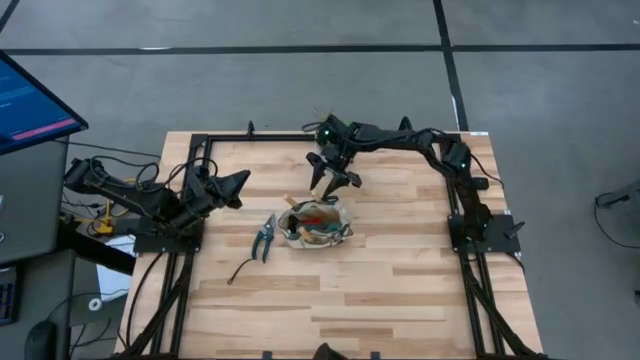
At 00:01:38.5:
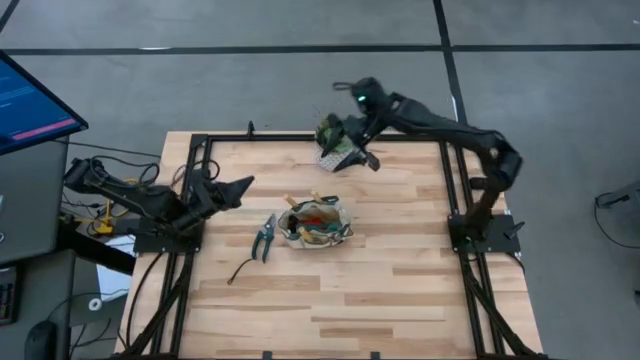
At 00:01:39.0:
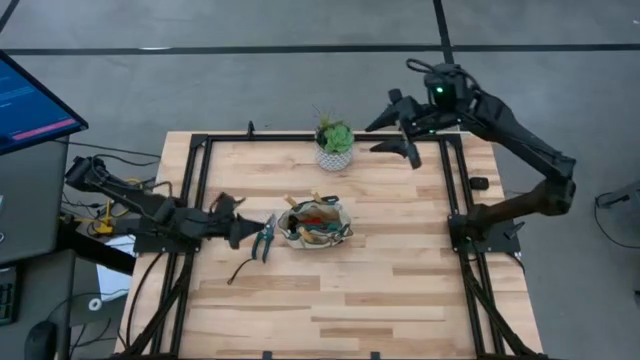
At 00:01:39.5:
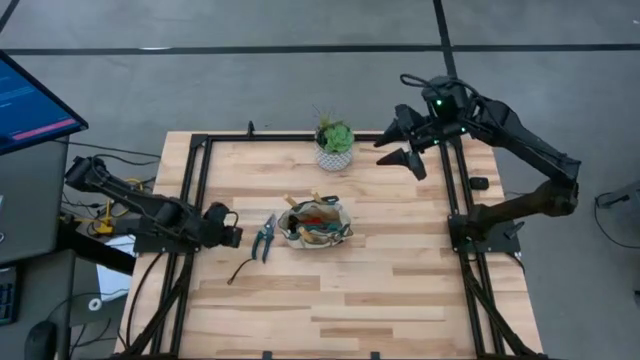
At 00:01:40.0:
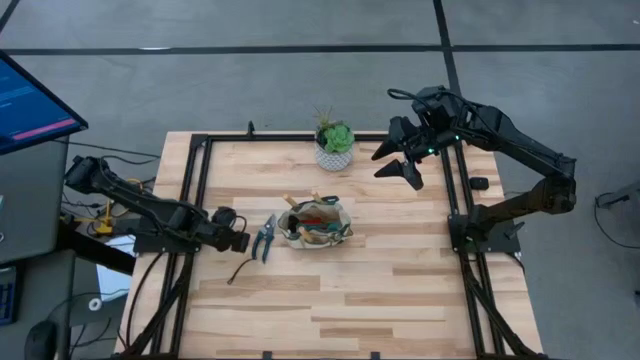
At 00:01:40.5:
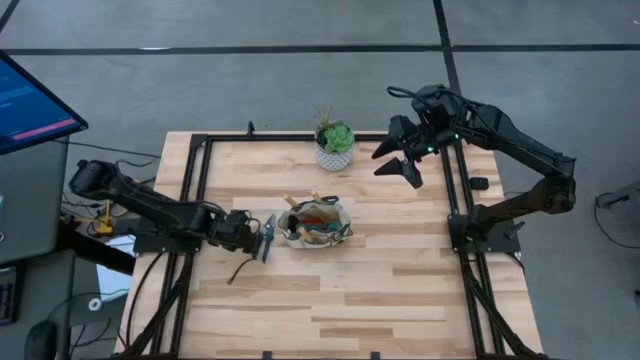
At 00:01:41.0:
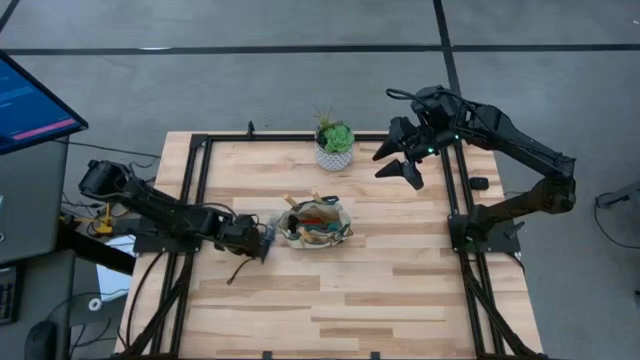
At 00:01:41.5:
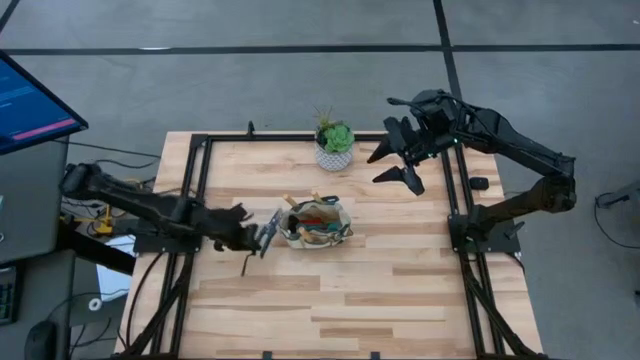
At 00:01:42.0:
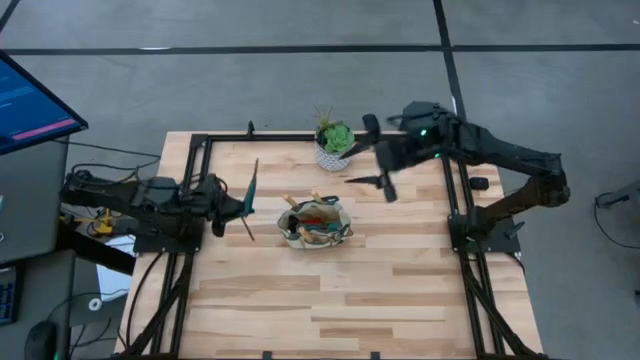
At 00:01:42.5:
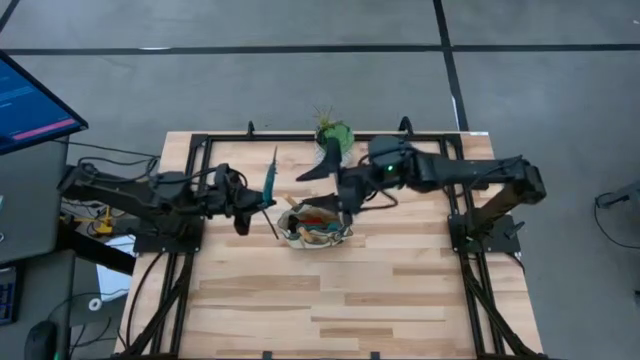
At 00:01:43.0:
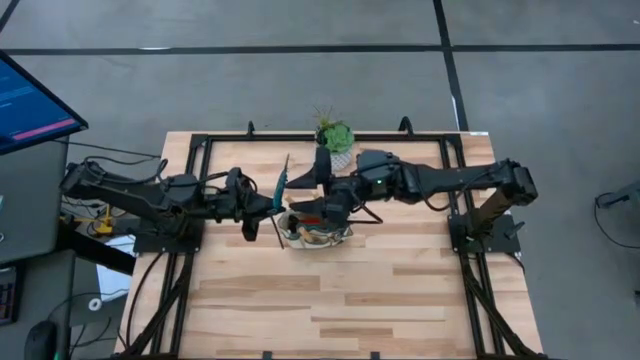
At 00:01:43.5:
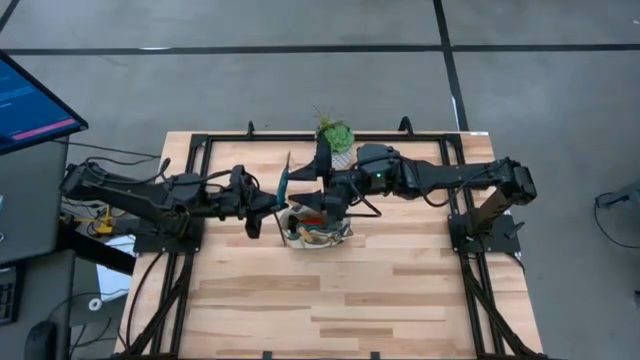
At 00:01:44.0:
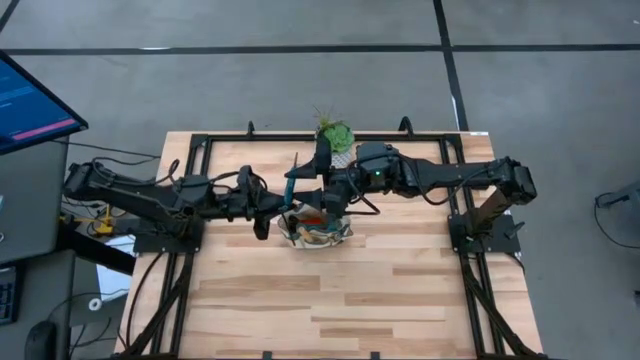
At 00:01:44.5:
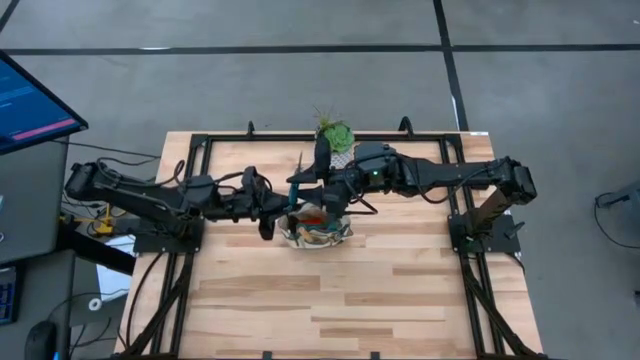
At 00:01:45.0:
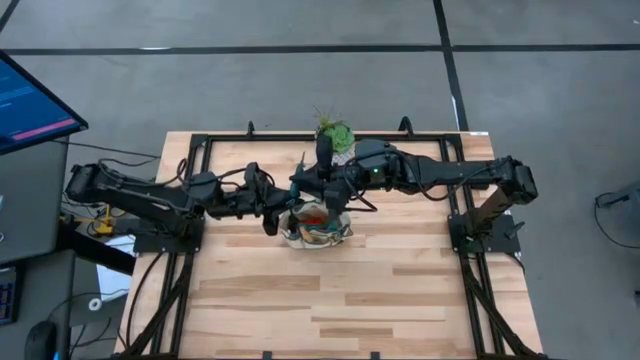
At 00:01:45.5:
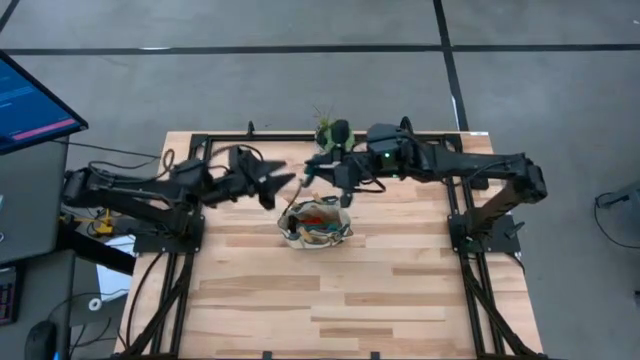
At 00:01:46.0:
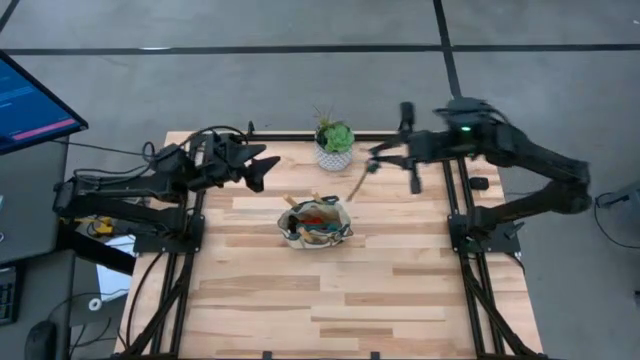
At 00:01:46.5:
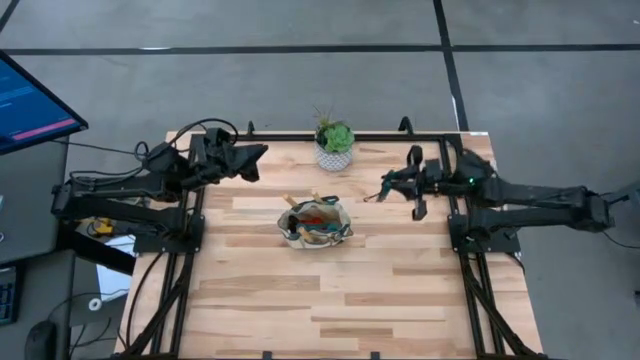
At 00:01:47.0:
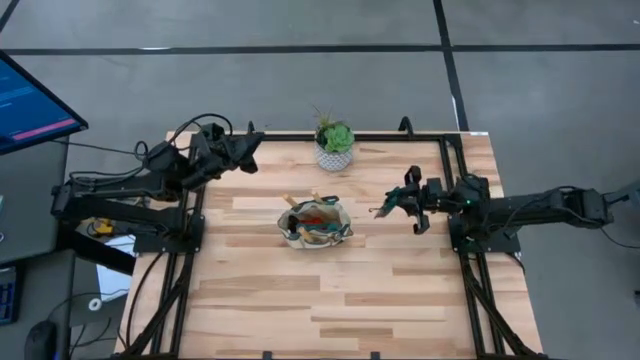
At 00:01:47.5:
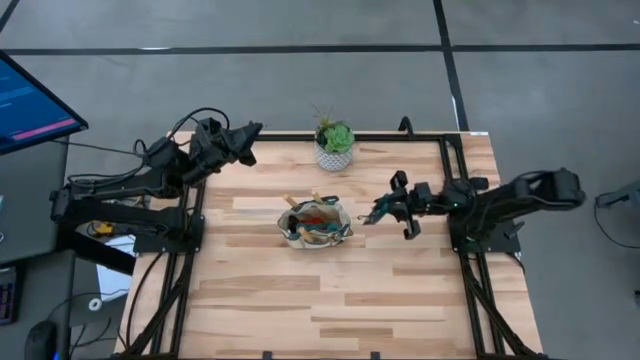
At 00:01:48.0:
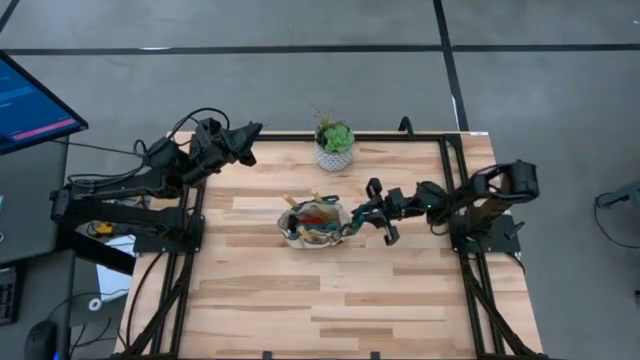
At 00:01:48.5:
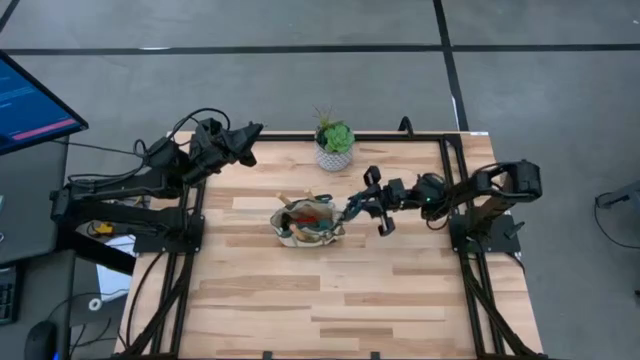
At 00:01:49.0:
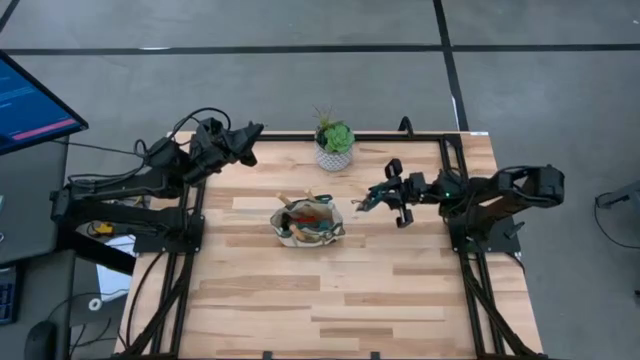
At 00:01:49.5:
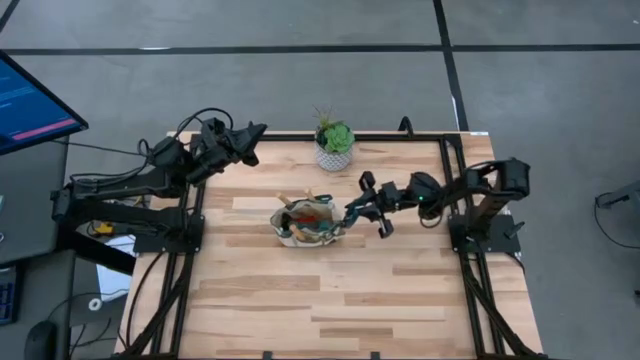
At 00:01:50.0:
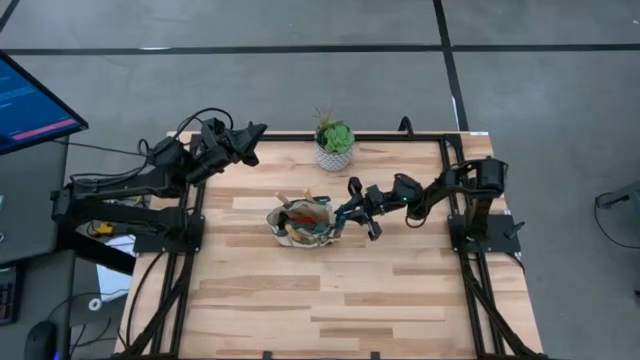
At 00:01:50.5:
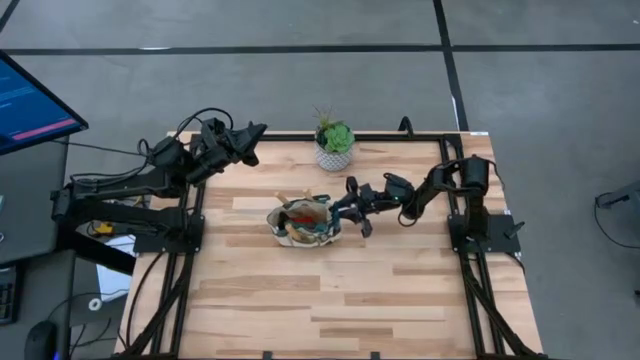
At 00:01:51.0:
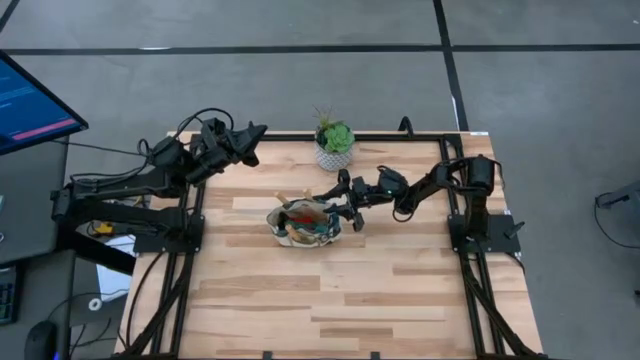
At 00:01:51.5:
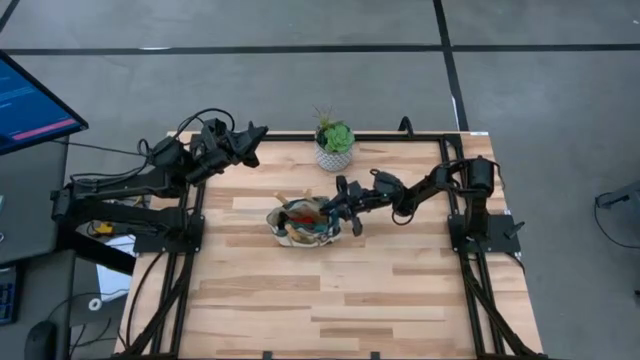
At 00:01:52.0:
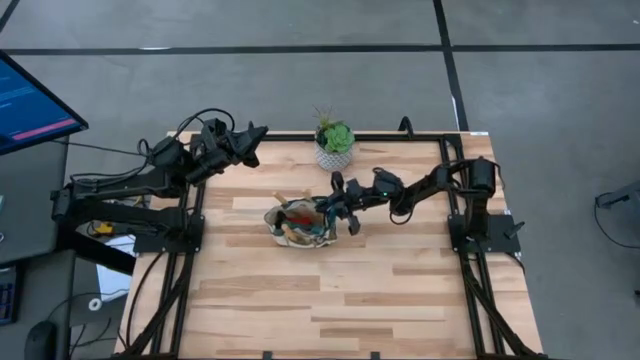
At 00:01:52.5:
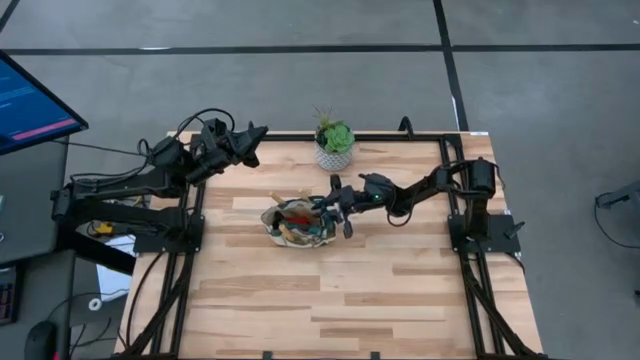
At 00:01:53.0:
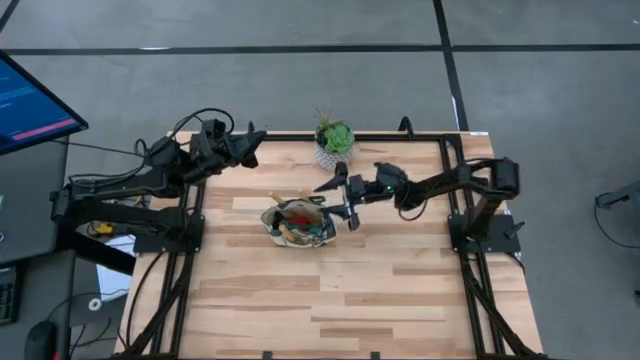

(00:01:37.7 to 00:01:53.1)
Task: Pick & Place Garden tools in Gardening bag
Put the shear scissors into the gardening bag

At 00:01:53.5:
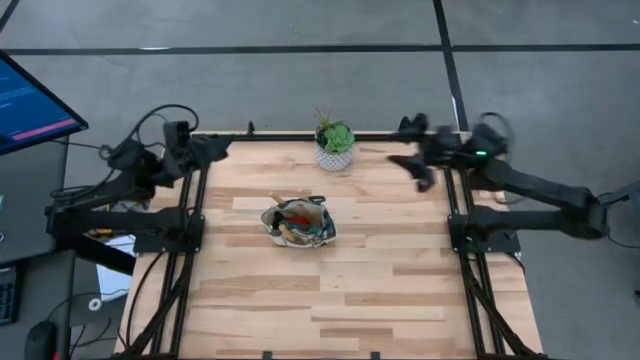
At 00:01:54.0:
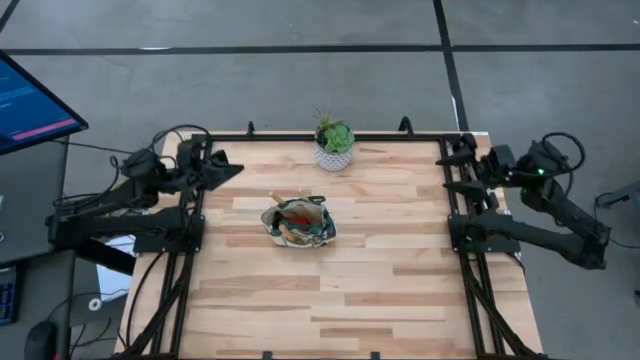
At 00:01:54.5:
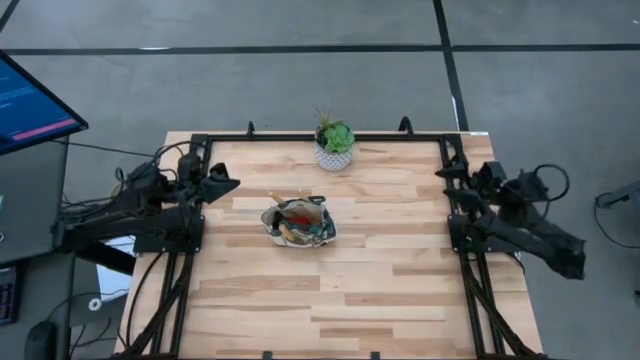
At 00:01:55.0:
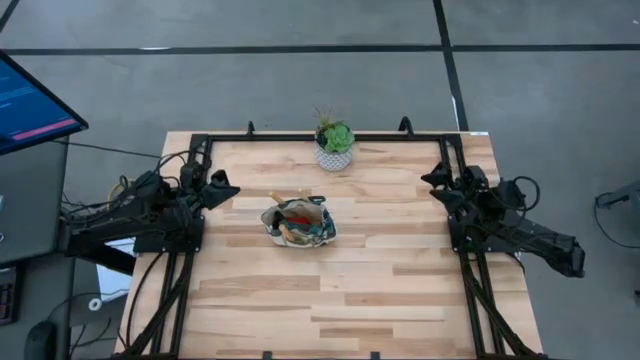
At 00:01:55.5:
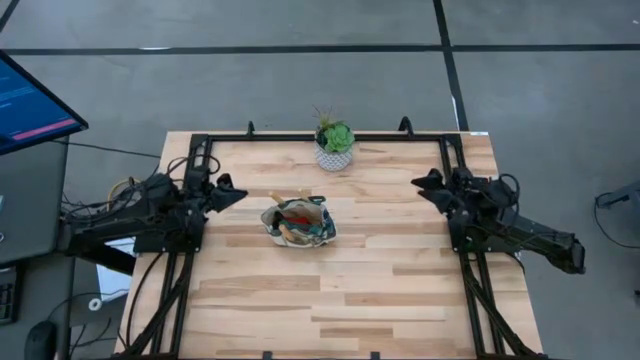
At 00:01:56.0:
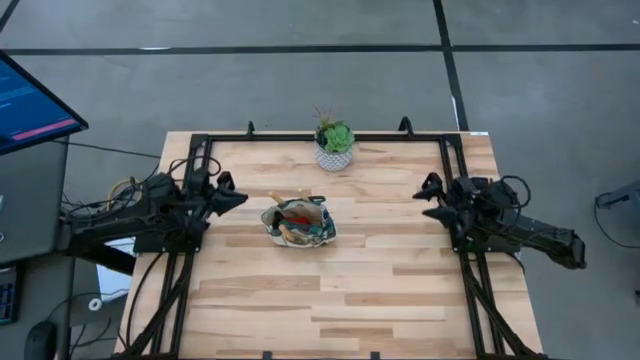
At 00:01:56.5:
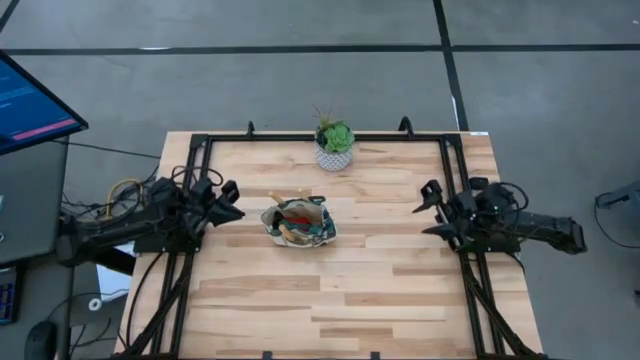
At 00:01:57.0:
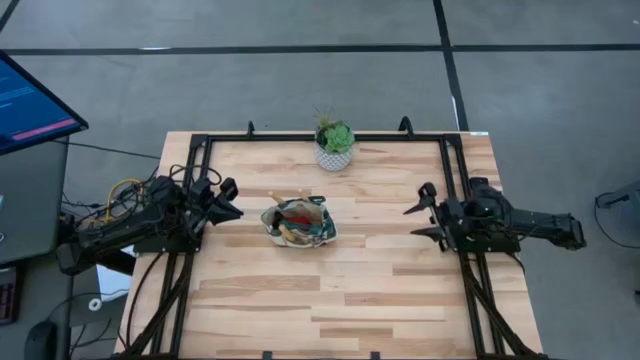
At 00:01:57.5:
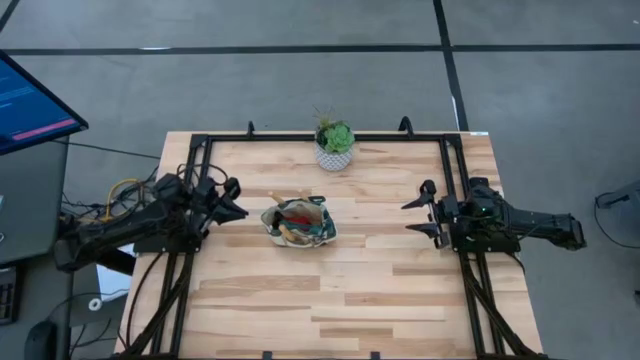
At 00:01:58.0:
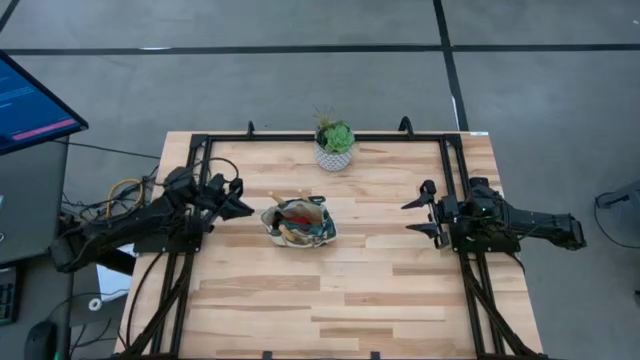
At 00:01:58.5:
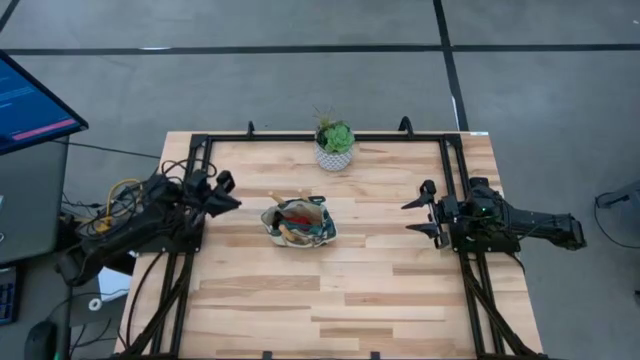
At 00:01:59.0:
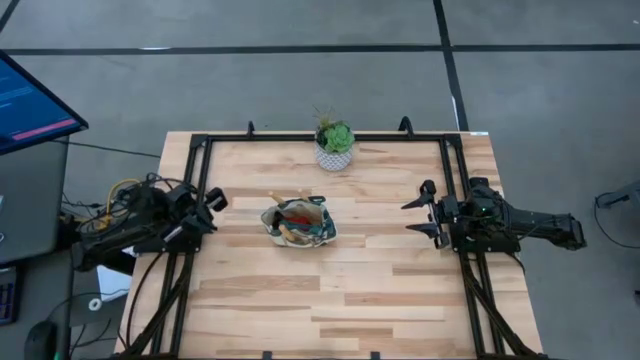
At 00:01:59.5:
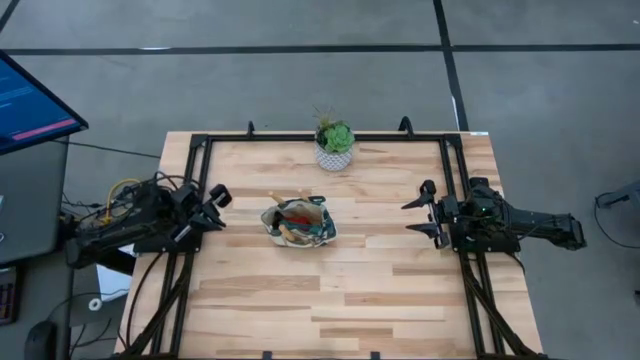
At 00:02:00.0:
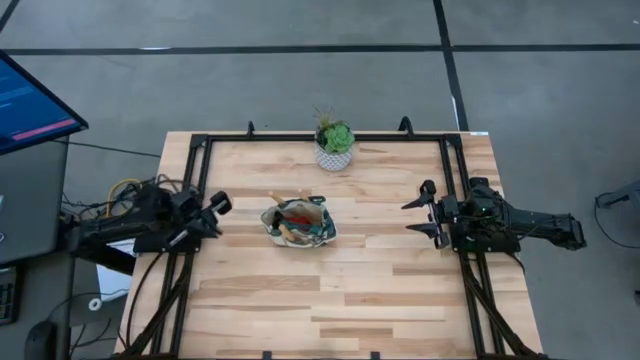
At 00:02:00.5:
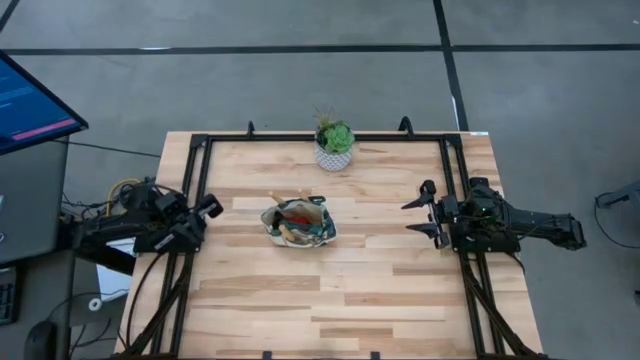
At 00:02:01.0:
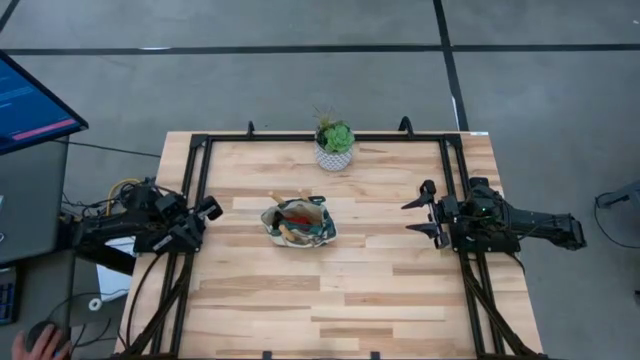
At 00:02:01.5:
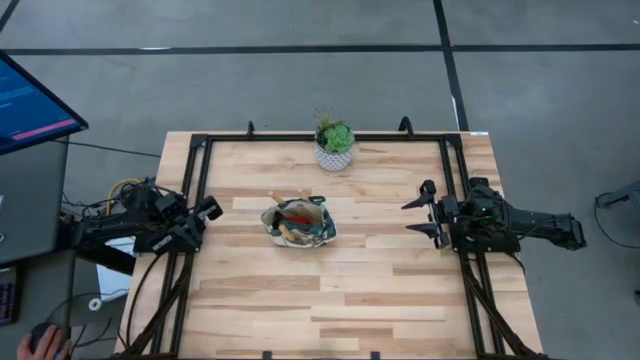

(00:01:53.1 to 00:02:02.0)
Return to Home Position
